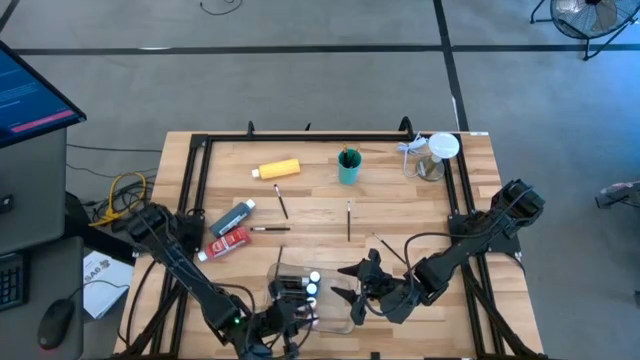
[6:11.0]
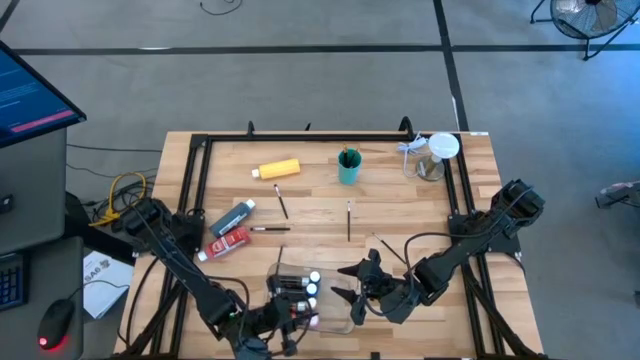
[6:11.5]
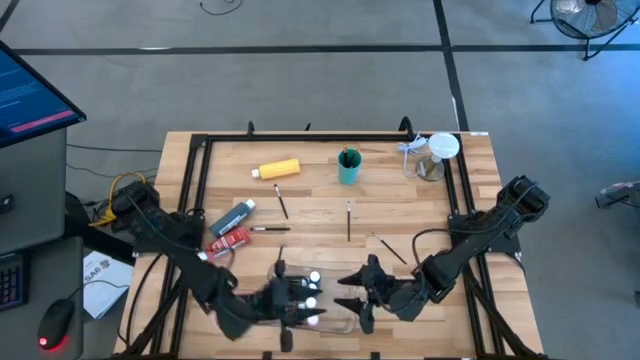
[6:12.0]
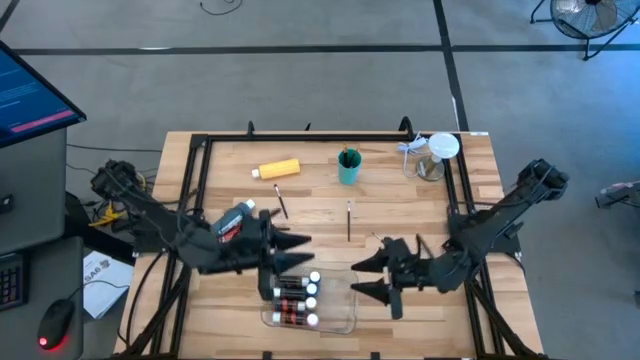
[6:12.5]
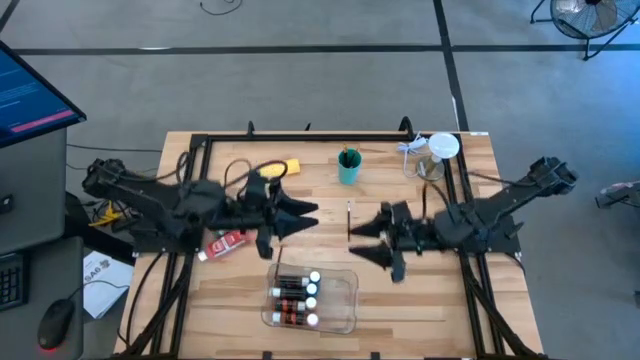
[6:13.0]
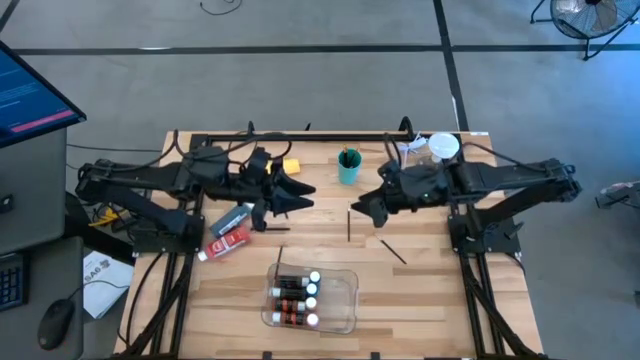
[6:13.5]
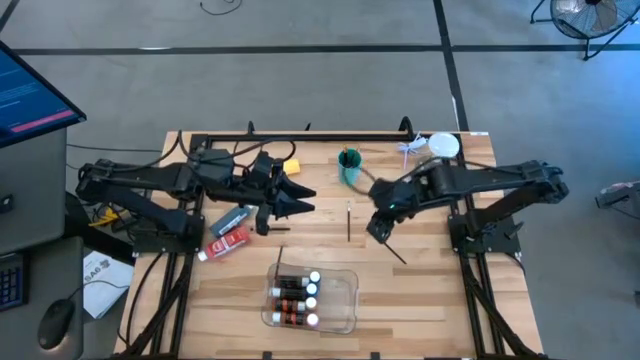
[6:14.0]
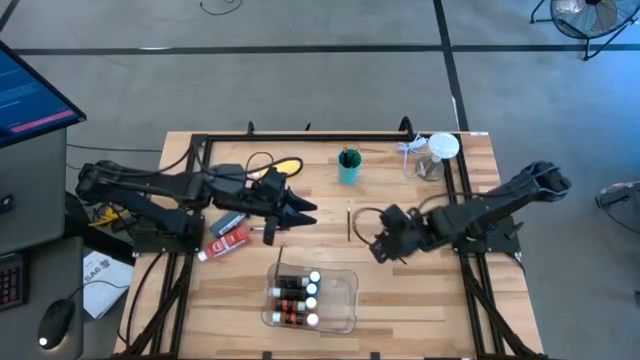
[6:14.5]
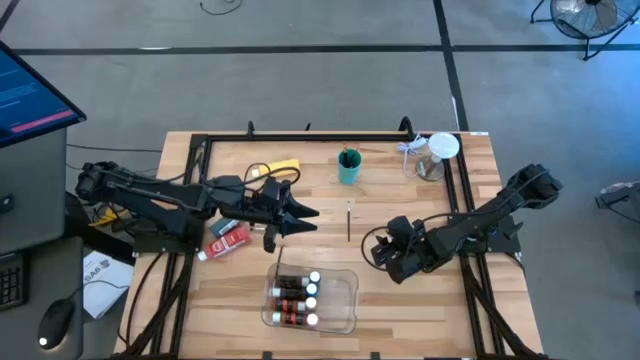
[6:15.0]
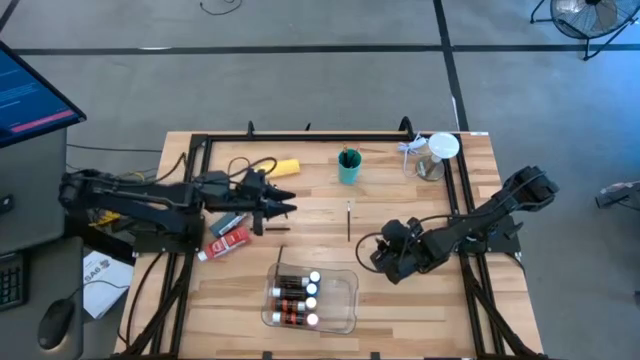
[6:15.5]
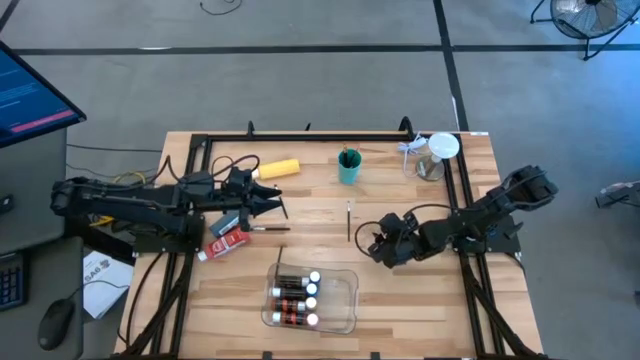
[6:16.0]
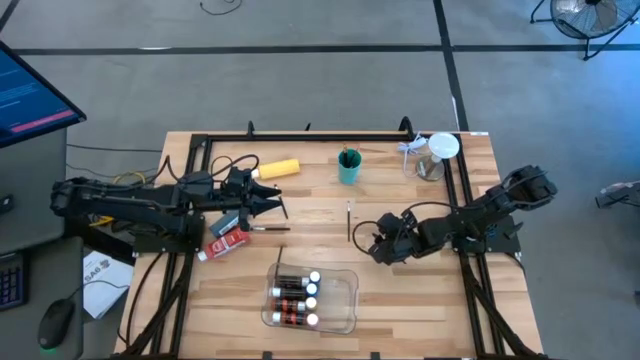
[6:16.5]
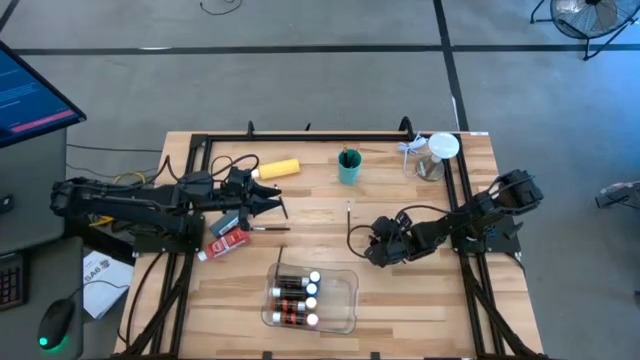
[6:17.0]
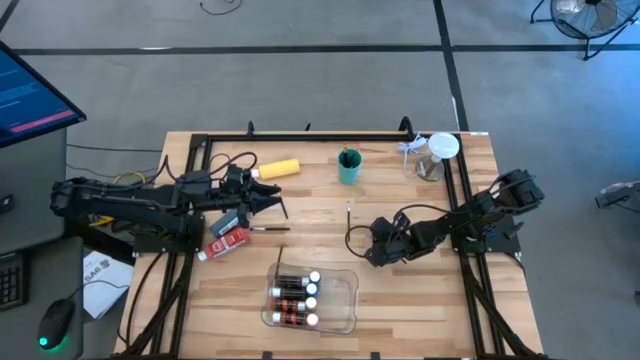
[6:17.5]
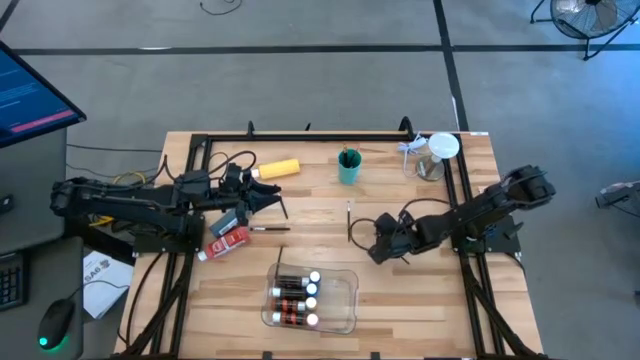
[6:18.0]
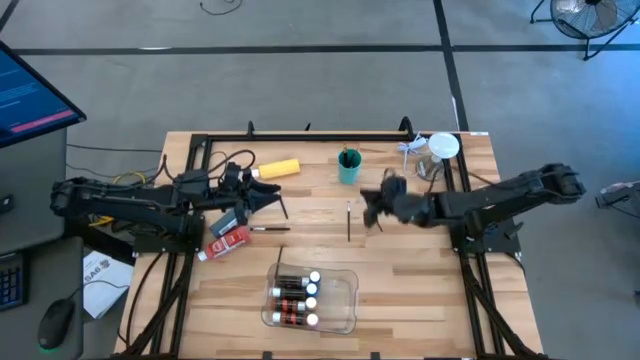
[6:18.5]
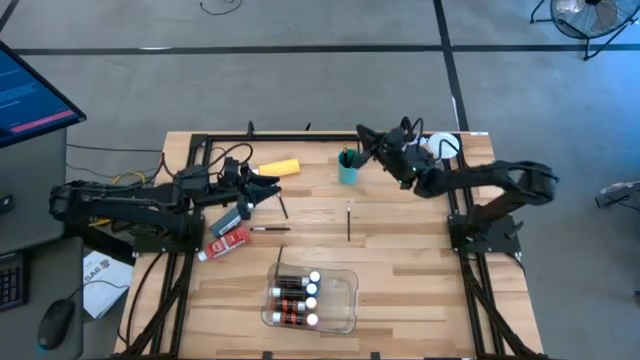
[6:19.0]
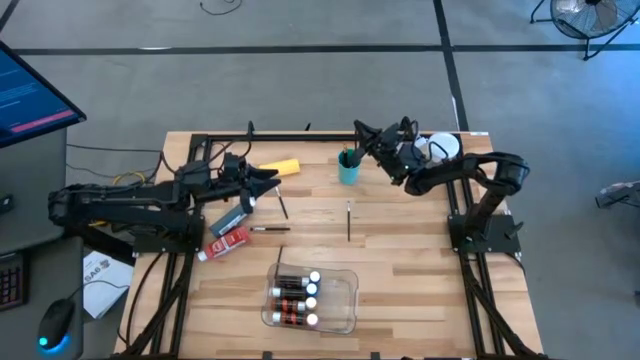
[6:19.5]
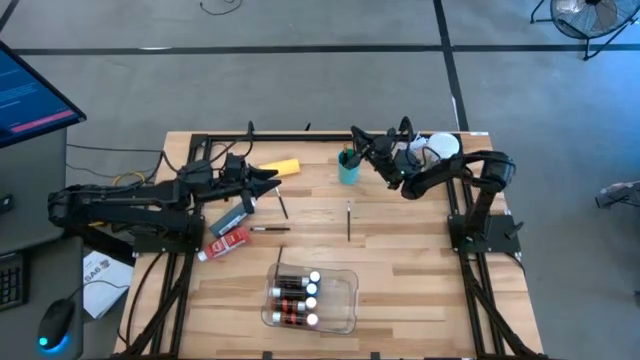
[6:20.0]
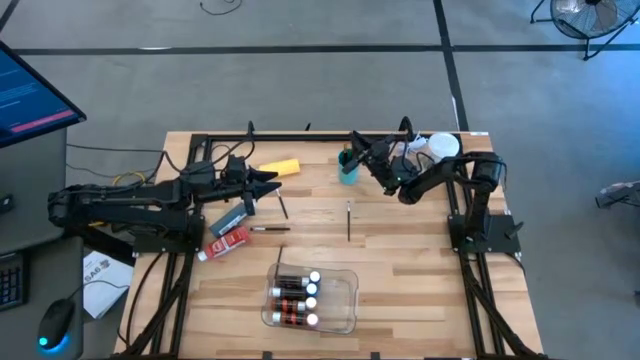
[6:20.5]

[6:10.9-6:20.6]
Task: Pick & Place Paint Supplies
Put the silver paint brush into the green cup

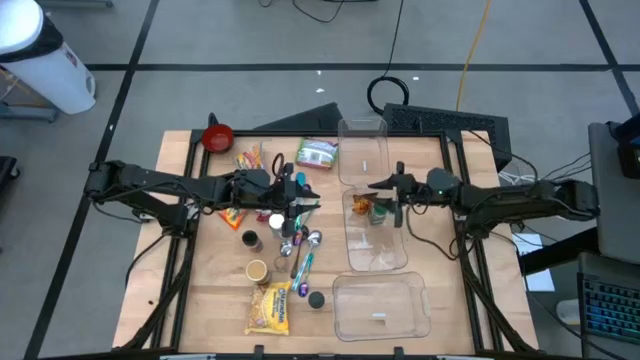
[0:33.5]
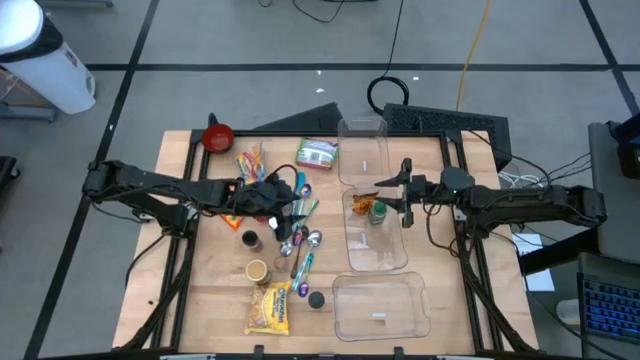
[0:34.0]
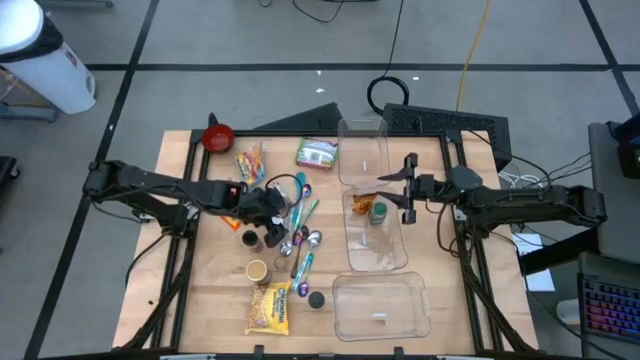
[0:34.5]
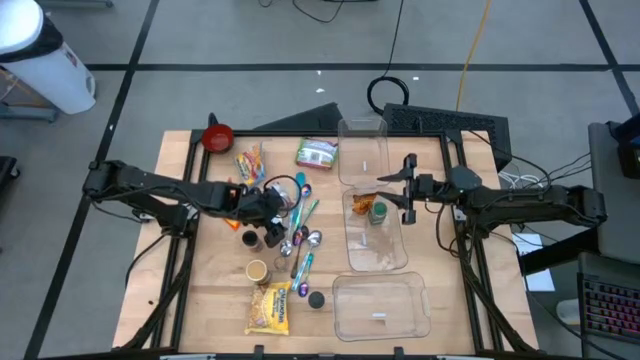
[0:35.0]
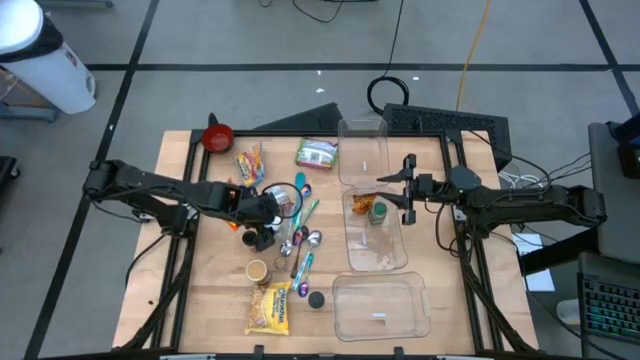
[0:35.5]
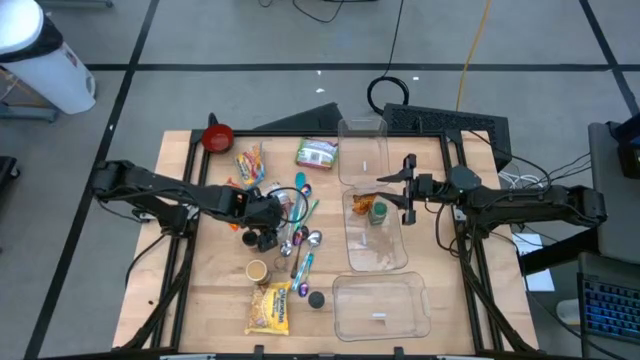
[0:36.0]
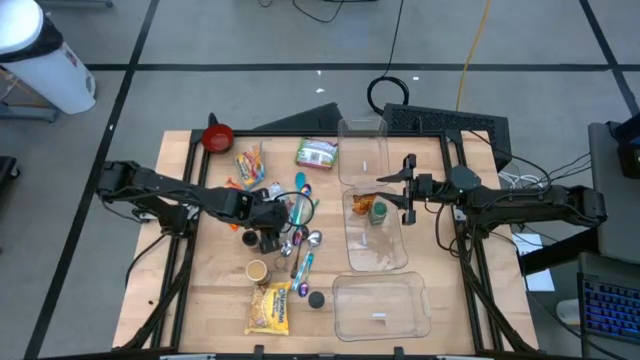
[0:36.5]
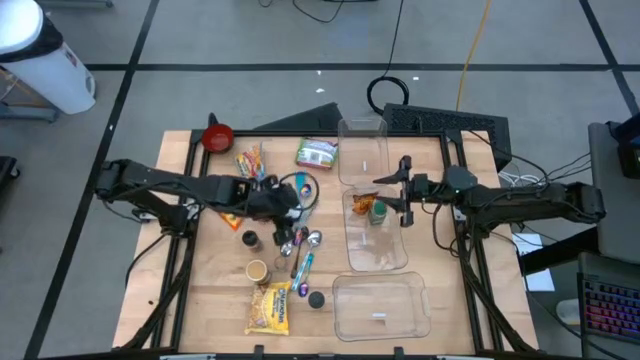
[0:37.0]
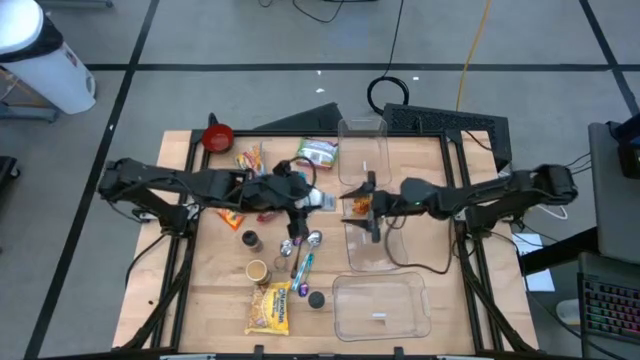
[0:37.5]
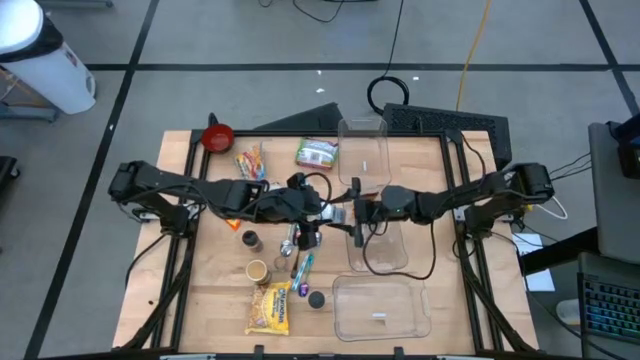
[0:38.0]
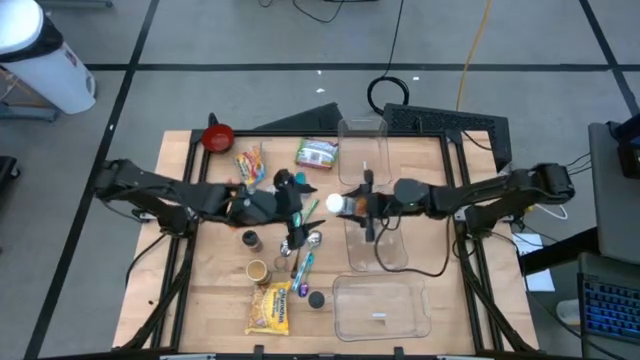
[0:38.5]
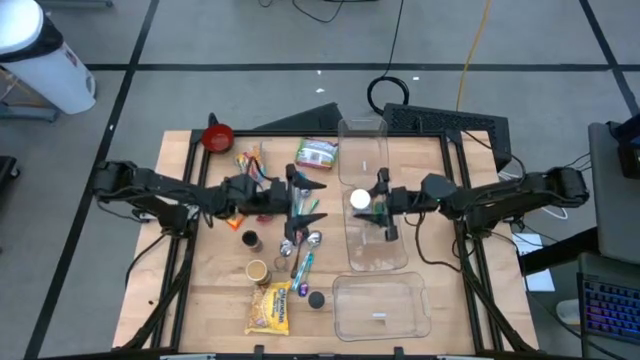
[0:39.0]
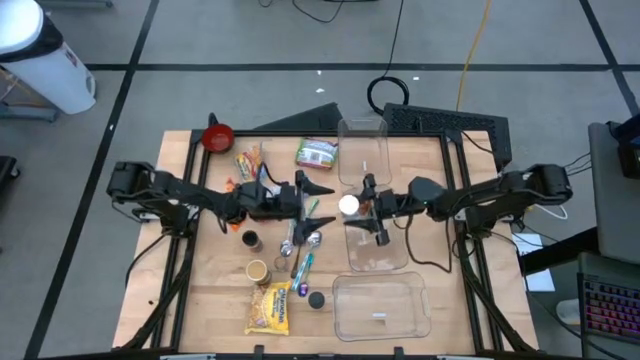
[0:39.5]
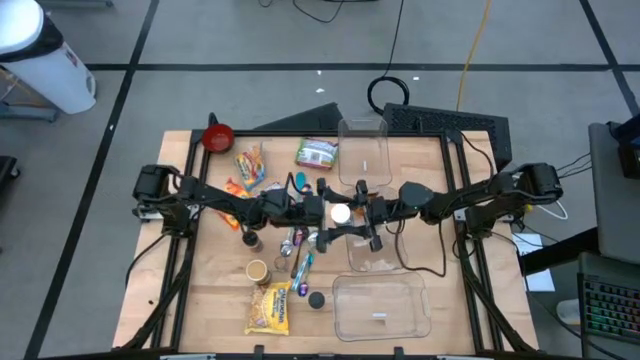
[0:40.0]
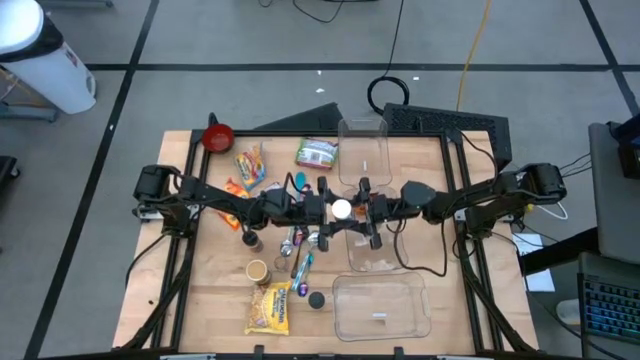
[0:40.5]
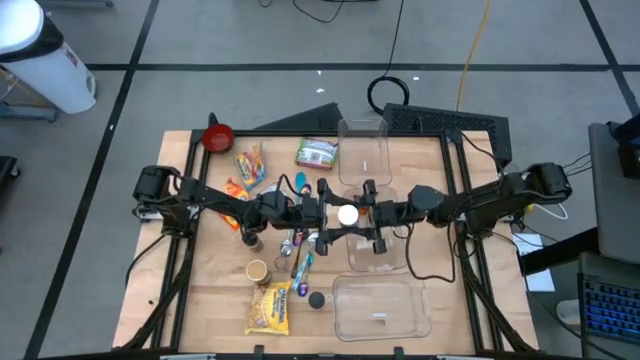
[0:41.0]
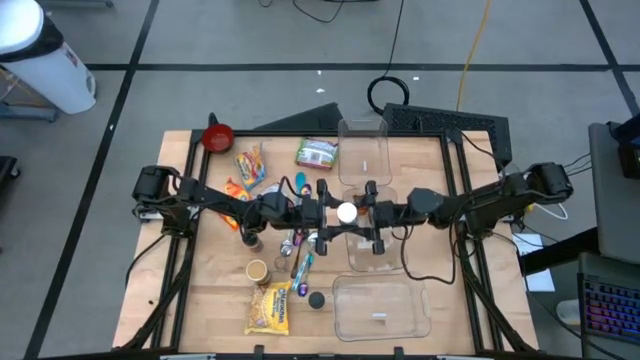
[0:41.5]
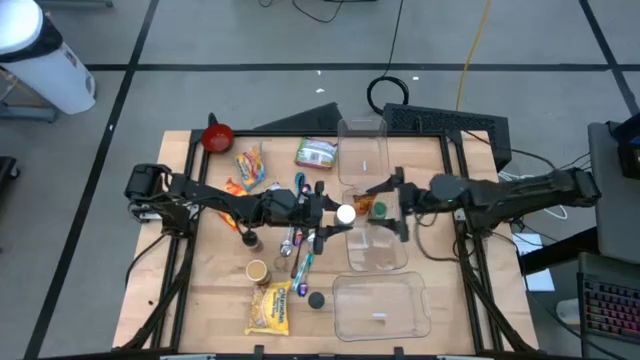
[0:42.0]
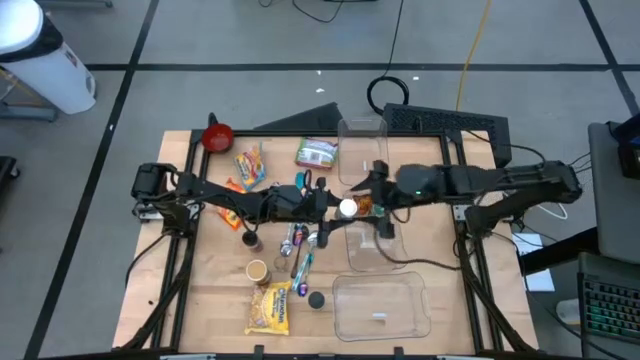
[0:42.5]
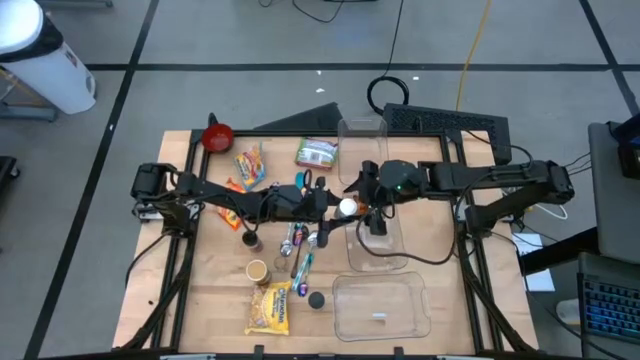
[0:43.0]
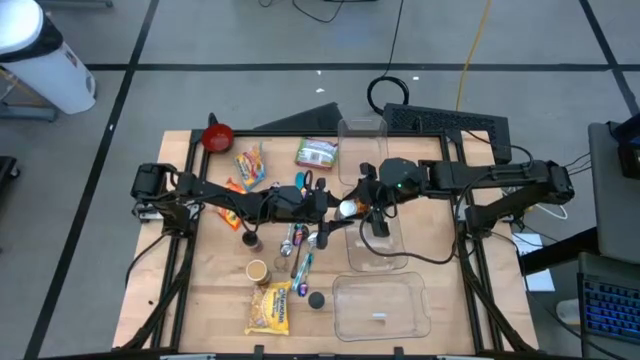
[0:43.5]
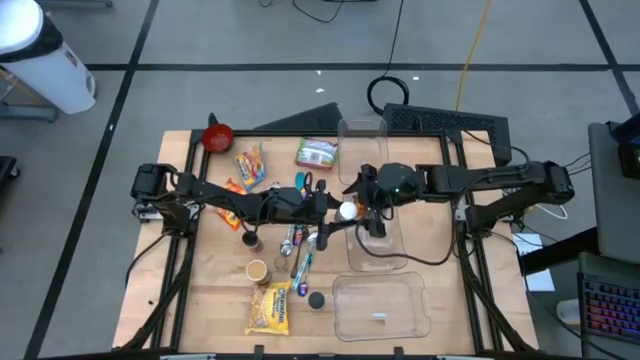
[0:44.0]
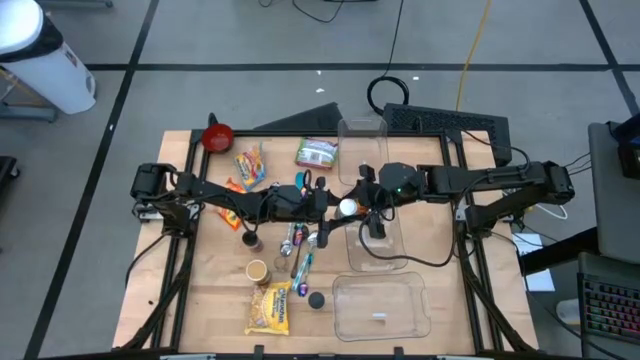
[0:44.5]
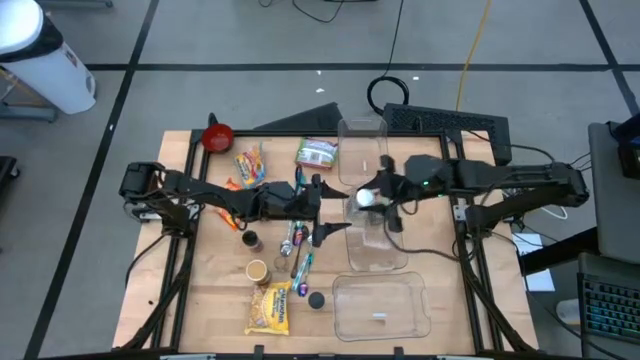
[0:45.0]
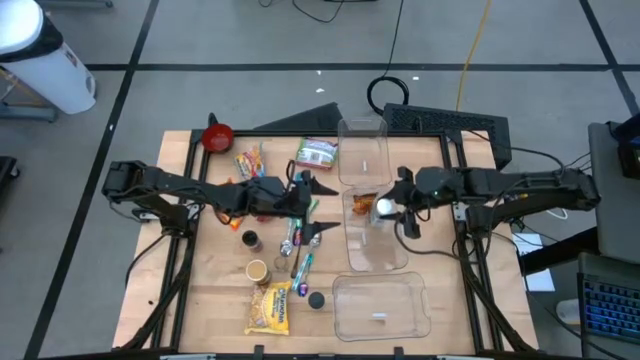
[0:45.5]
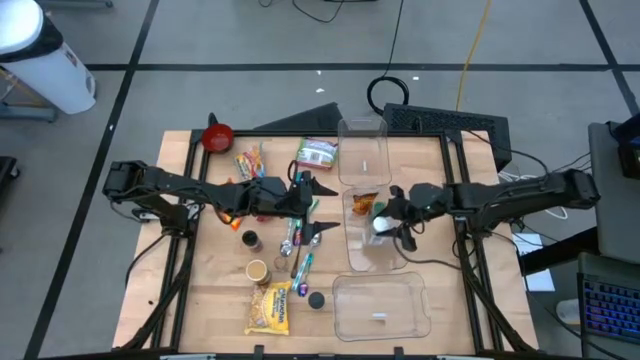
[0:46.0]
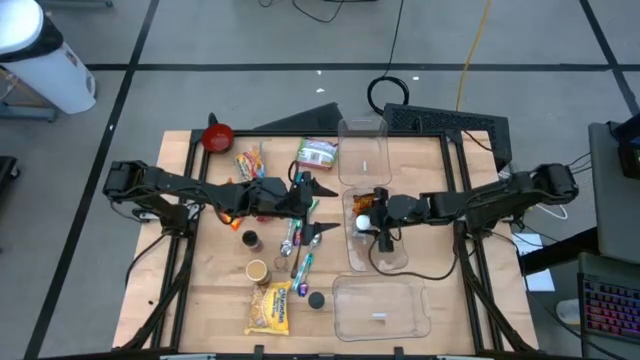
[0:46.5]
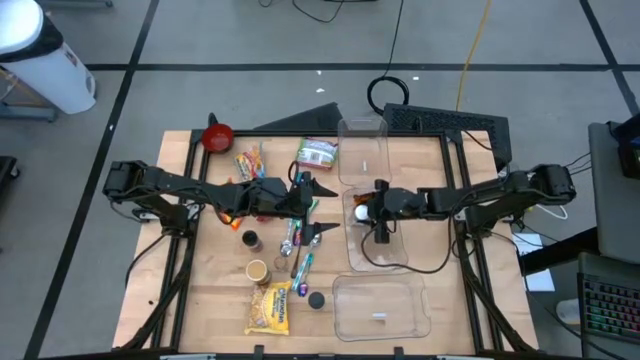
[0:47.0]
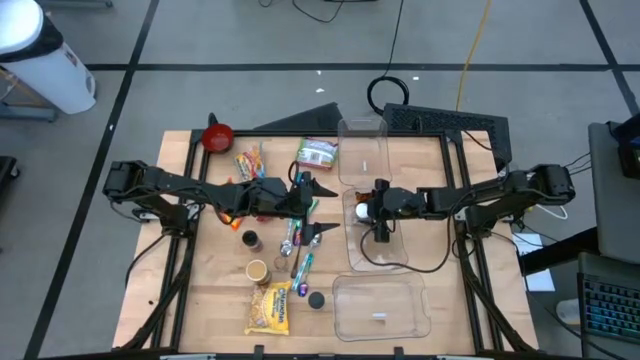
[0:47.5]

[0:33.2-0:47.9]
Task: Pick & Place Food Item
Put the white seasoning bottle into the middle transparent bin
